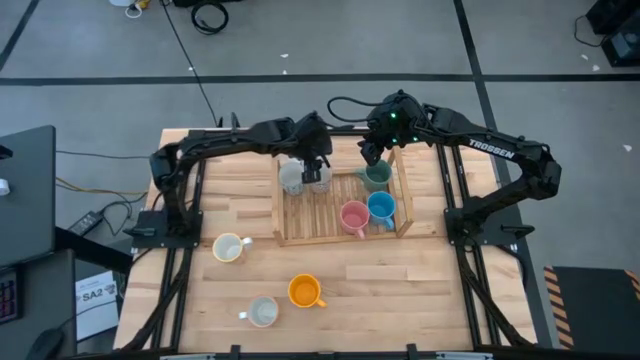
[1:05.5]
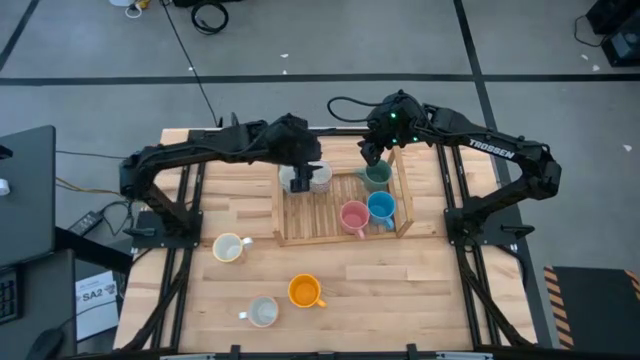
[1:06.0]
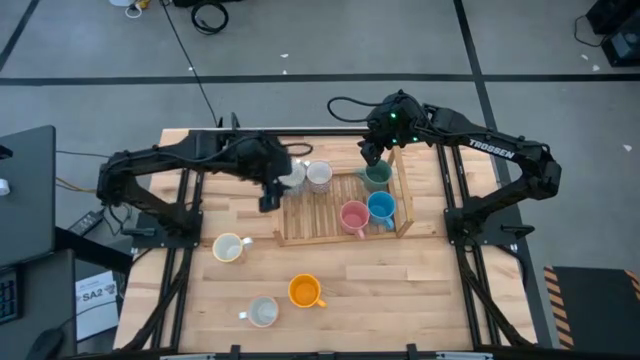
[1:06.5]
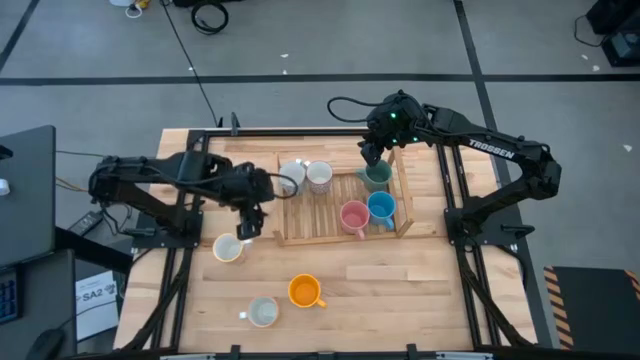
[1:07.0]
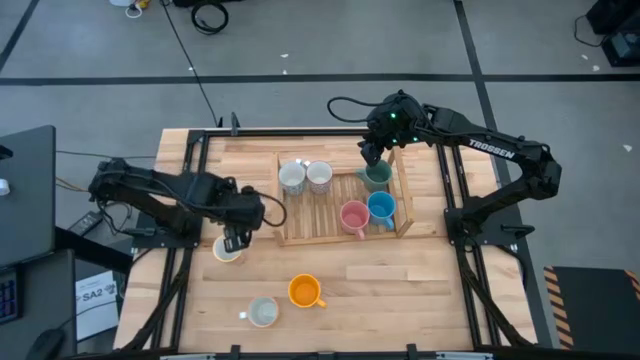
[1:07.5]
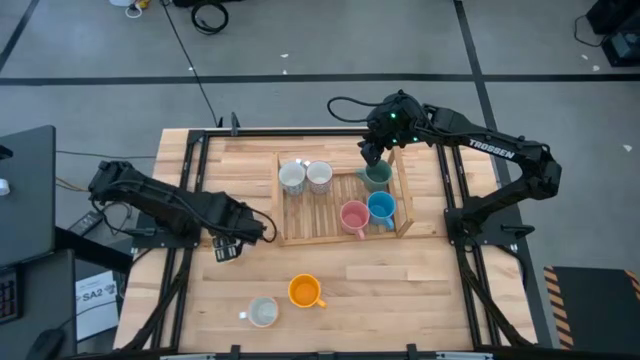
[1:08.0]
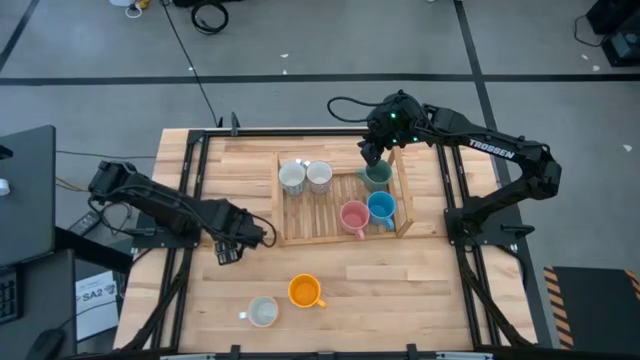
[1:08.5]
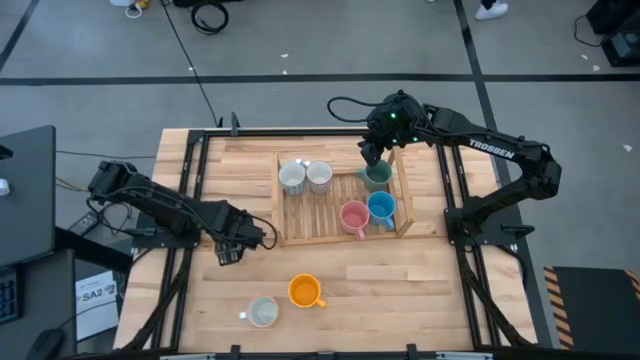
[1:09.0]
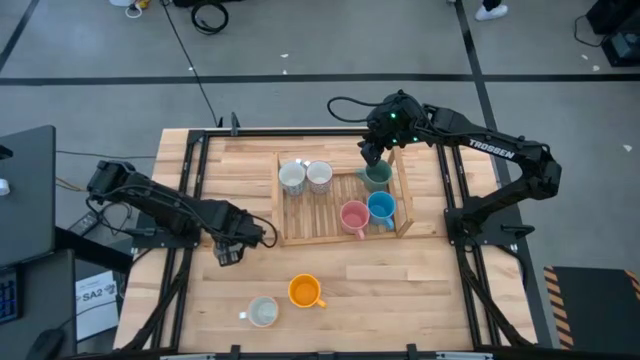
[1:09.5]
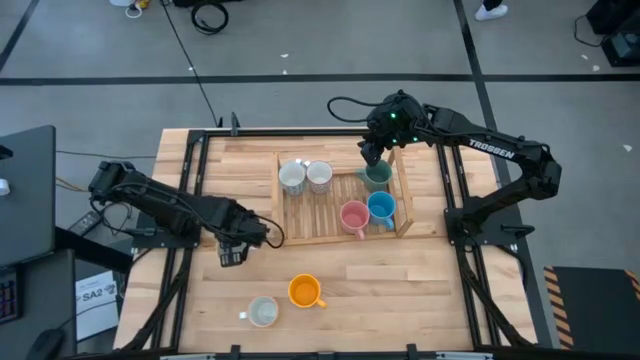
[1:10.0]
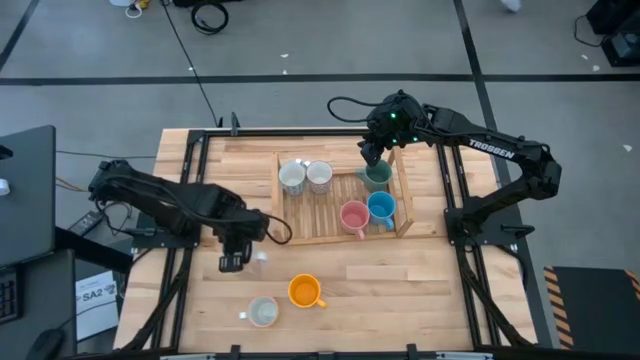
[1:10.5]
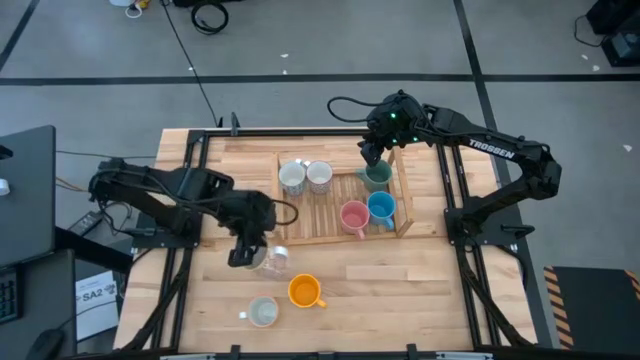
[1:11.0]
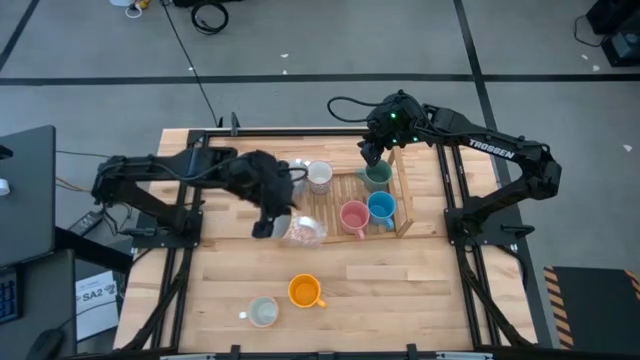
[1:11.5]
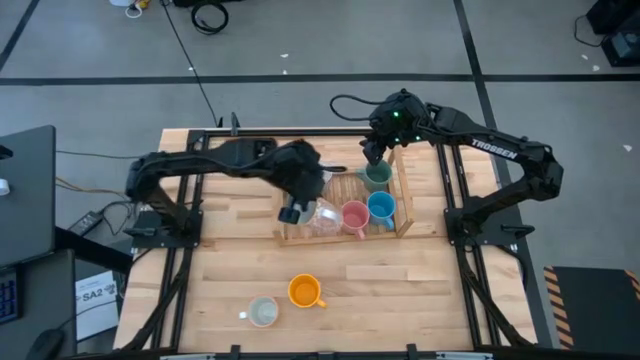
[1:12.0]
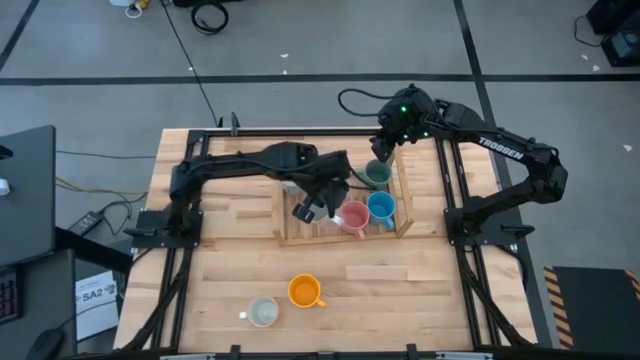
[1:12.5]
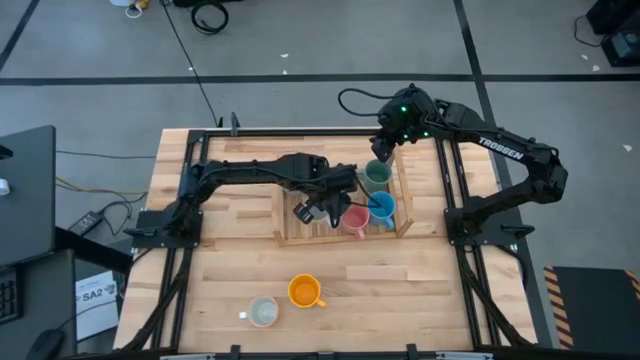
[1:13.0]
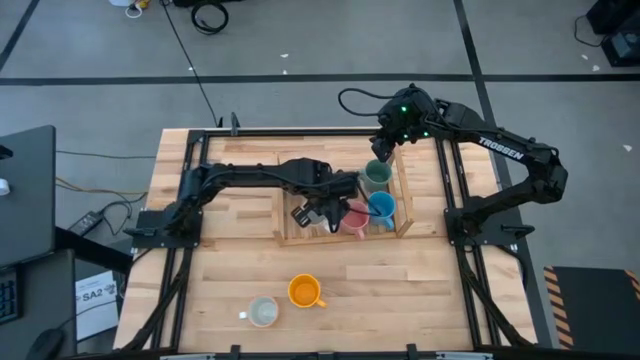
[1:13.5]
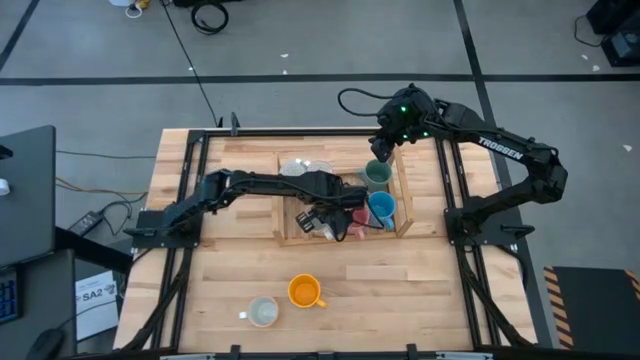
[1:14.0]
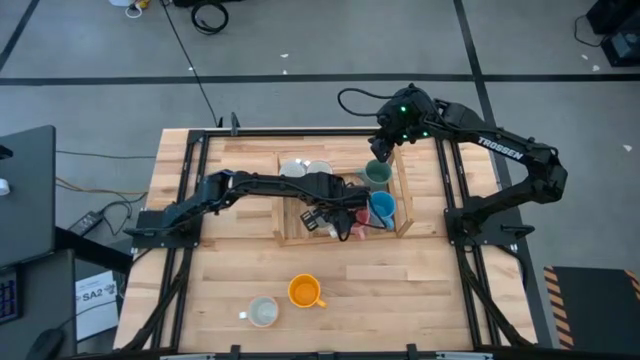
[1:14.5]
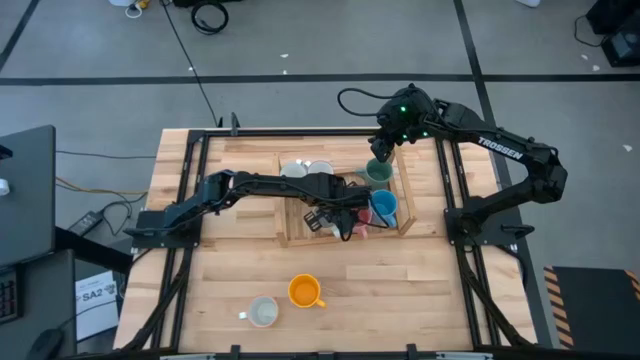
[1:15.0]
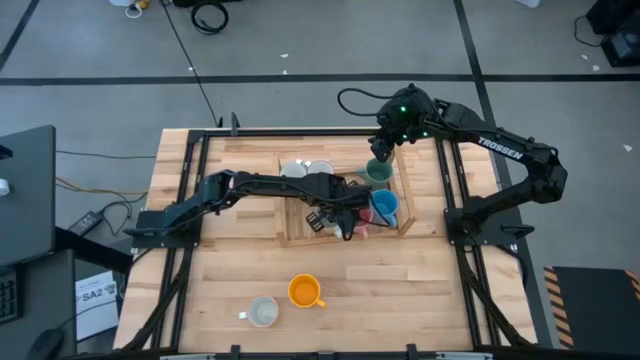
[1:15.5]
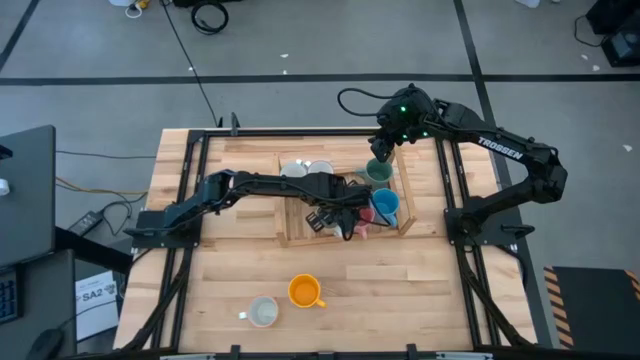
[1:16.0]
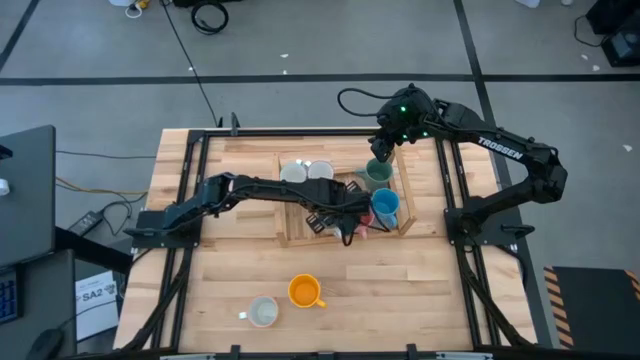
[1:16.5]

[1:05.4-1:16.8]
Task: Place coffee mugs
Put the orange cup on the shelf aligned with the gray cup
